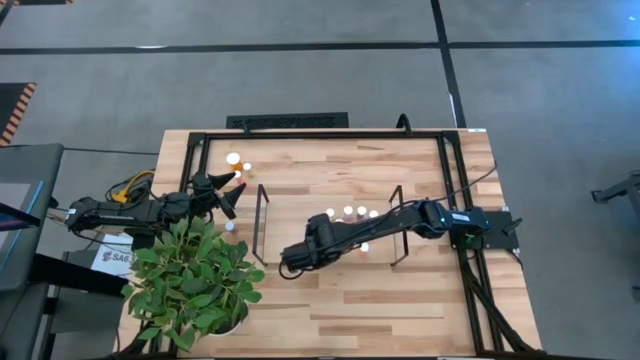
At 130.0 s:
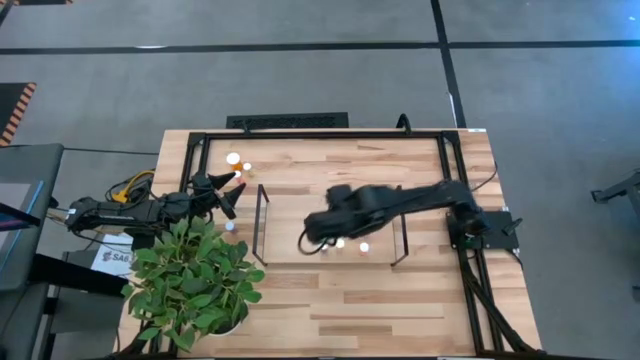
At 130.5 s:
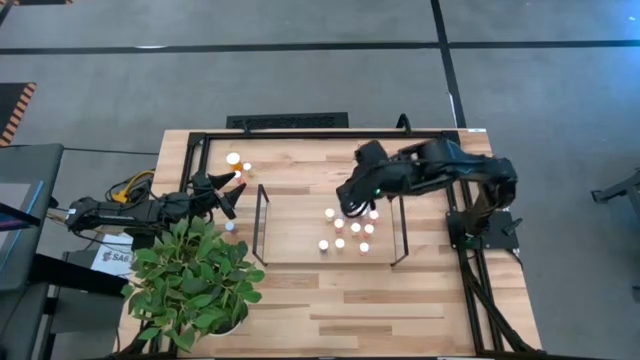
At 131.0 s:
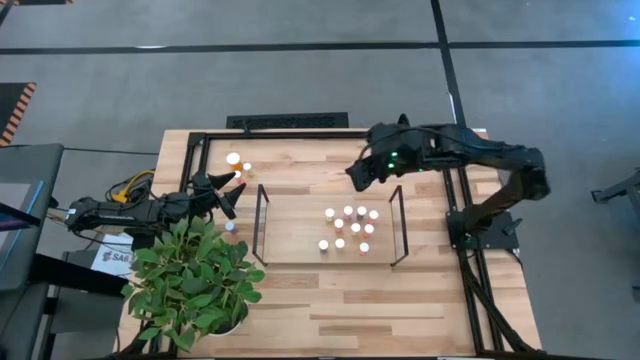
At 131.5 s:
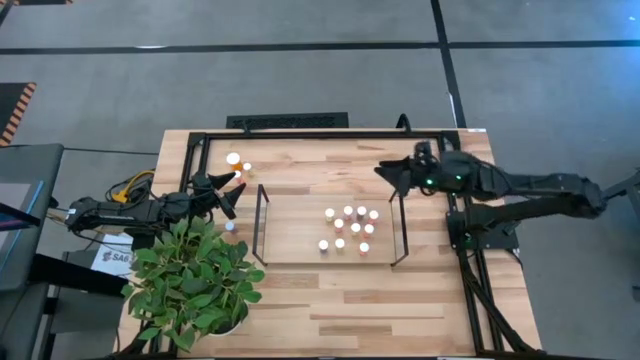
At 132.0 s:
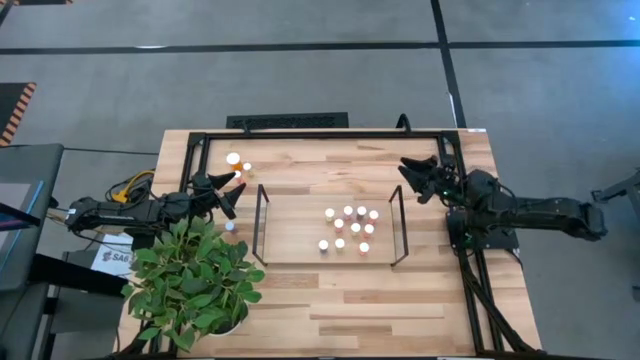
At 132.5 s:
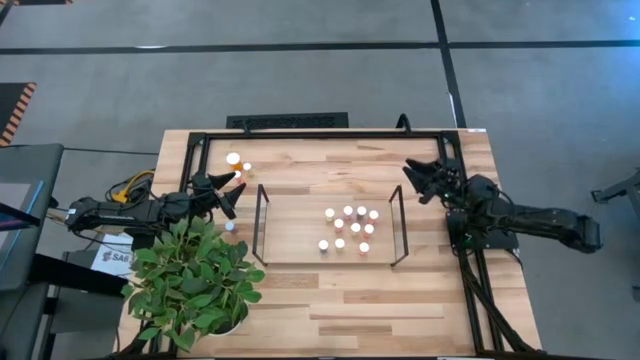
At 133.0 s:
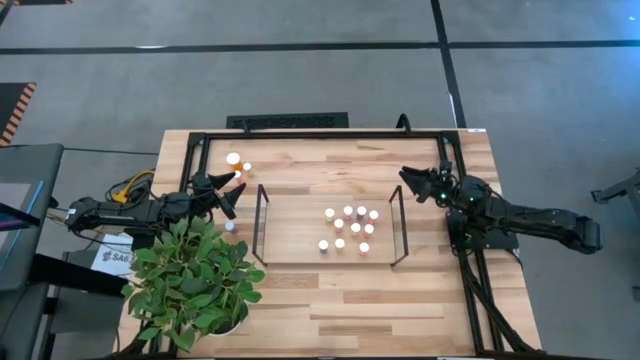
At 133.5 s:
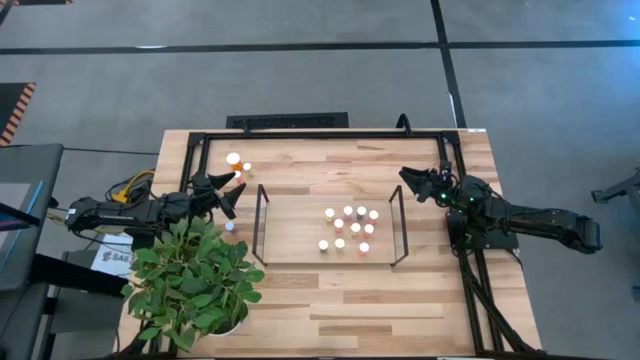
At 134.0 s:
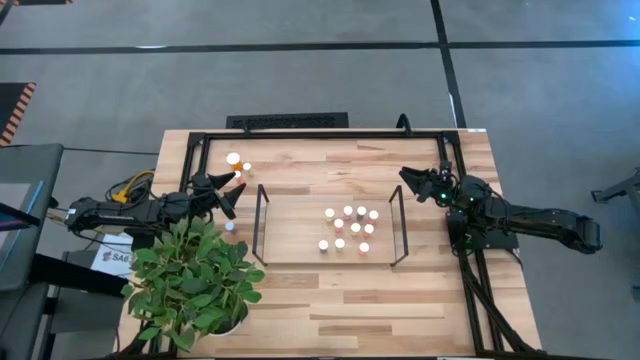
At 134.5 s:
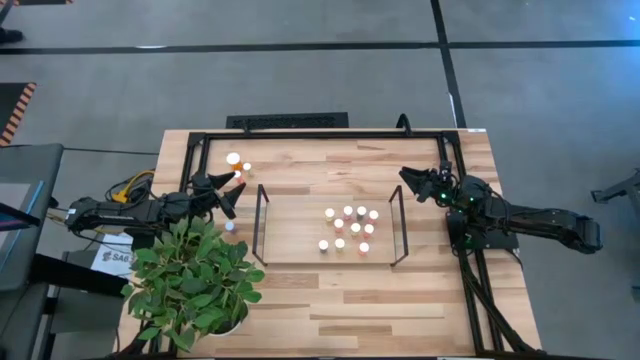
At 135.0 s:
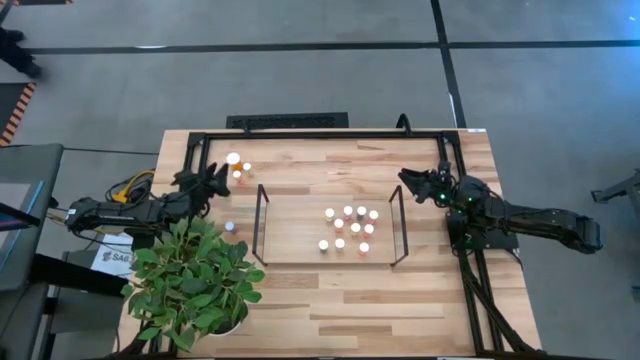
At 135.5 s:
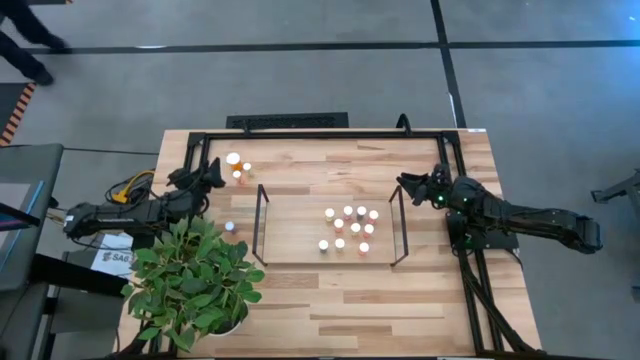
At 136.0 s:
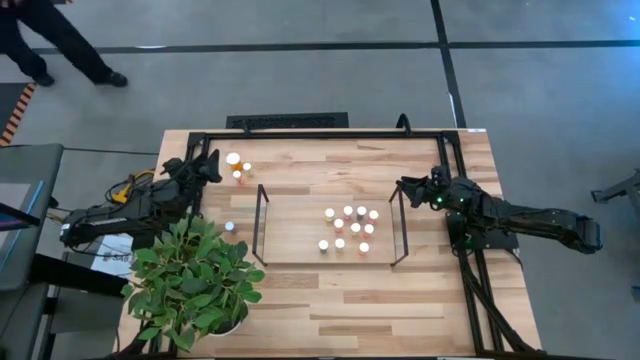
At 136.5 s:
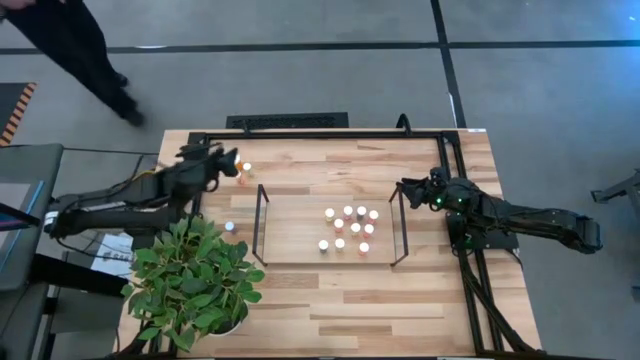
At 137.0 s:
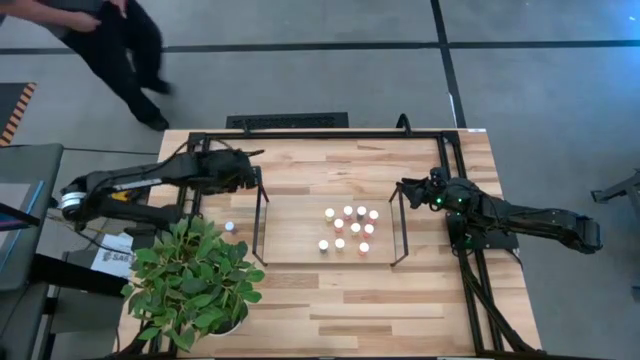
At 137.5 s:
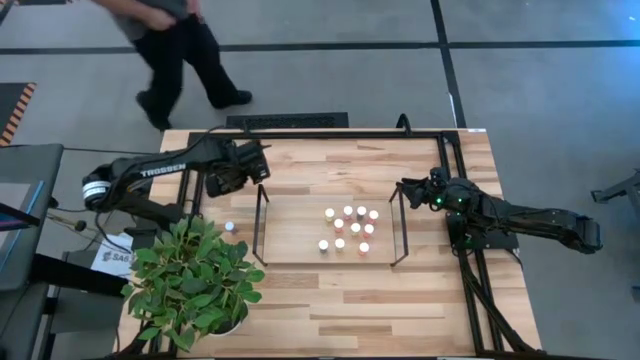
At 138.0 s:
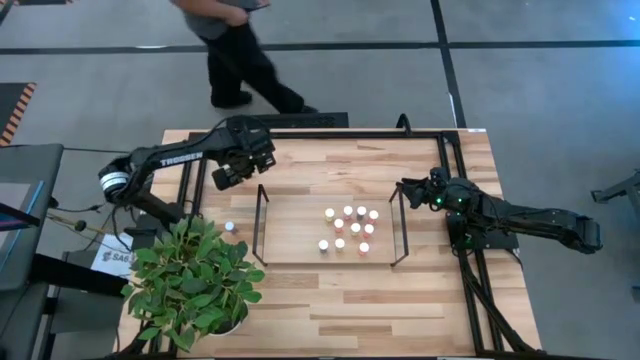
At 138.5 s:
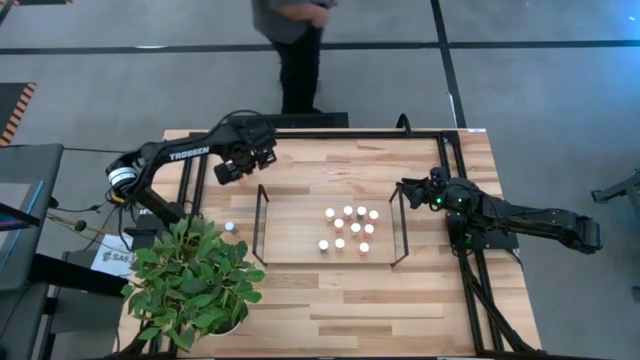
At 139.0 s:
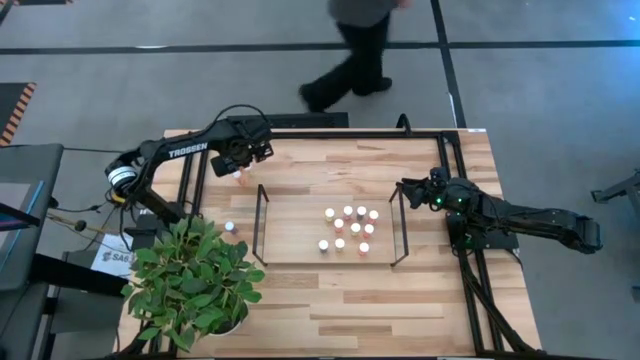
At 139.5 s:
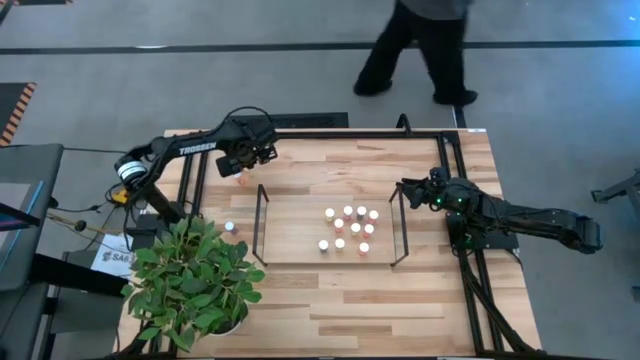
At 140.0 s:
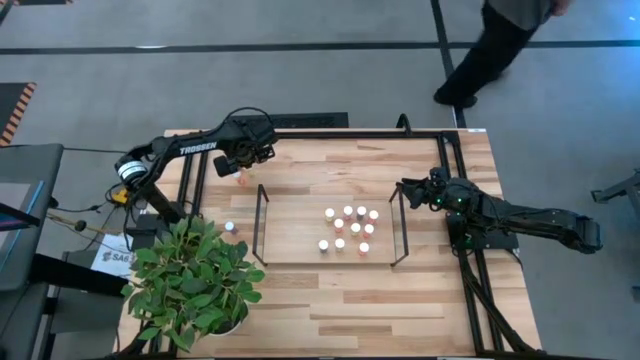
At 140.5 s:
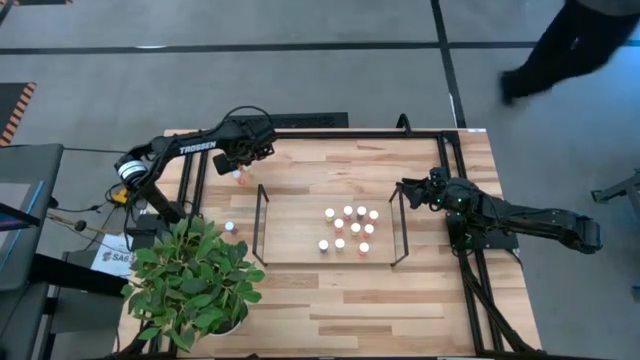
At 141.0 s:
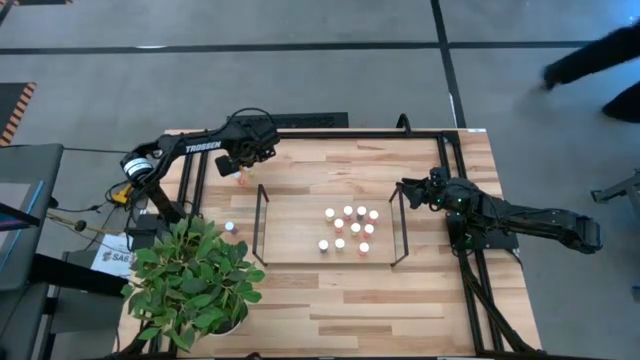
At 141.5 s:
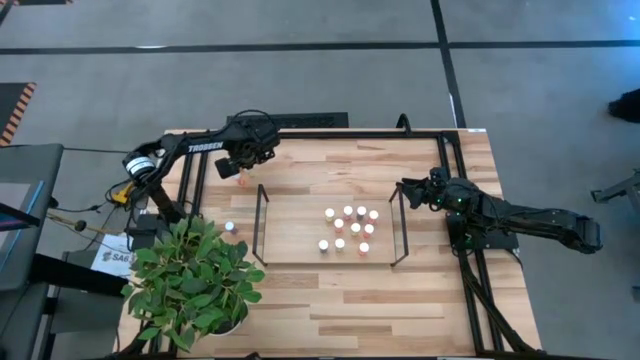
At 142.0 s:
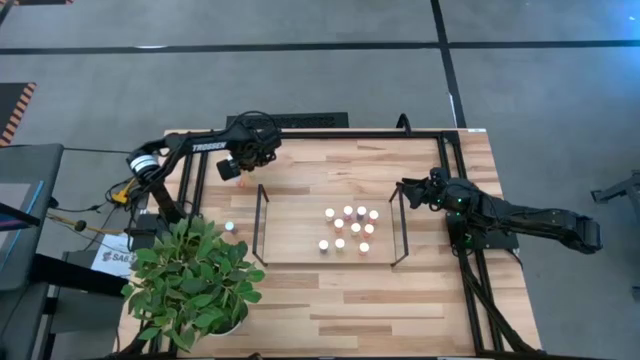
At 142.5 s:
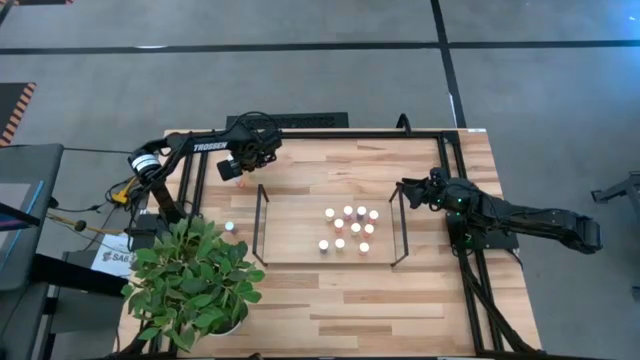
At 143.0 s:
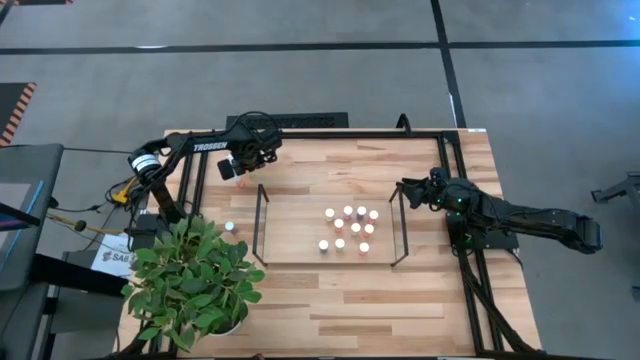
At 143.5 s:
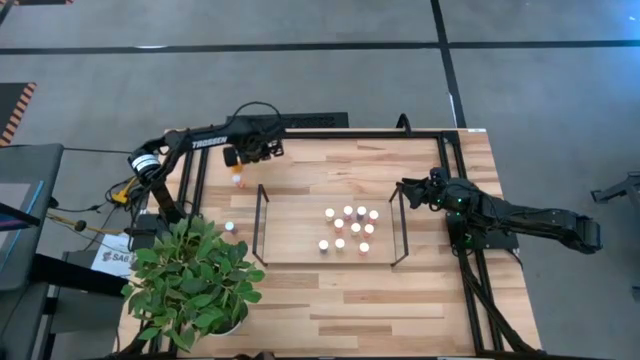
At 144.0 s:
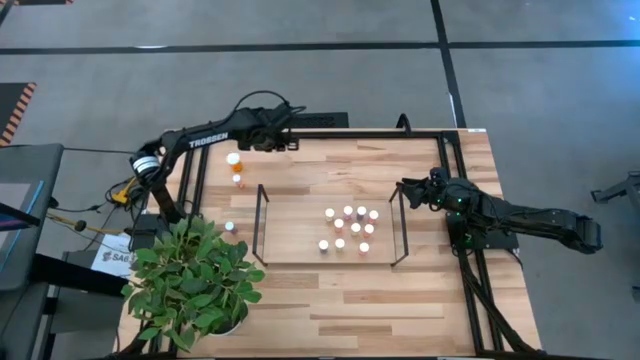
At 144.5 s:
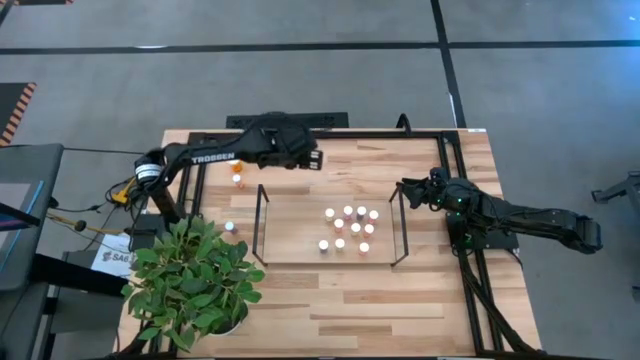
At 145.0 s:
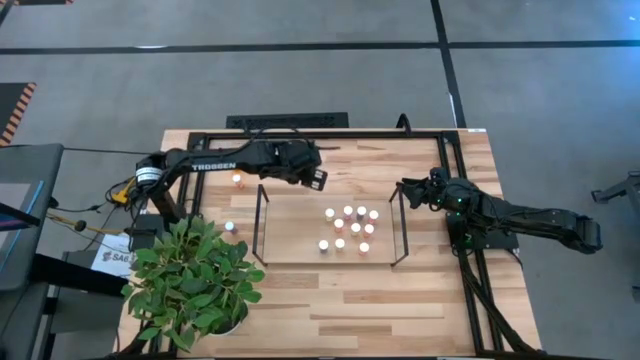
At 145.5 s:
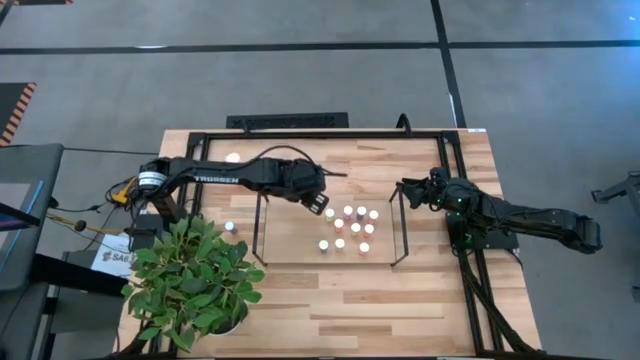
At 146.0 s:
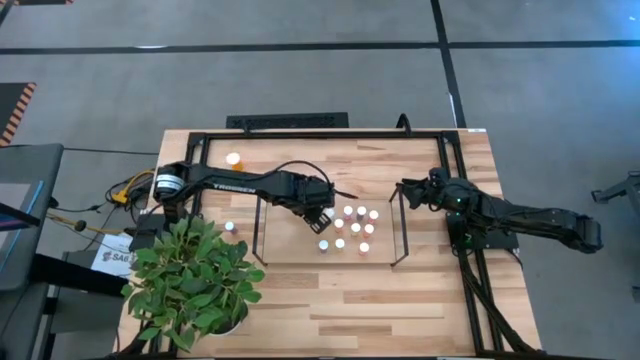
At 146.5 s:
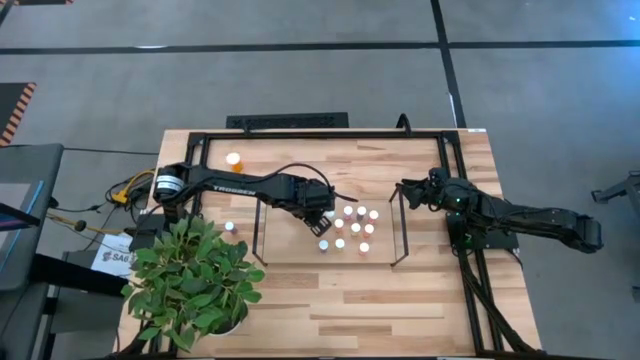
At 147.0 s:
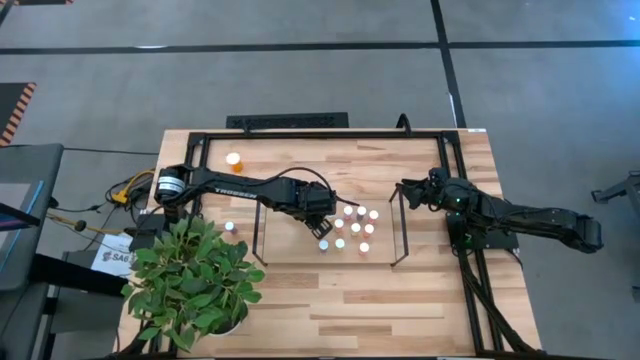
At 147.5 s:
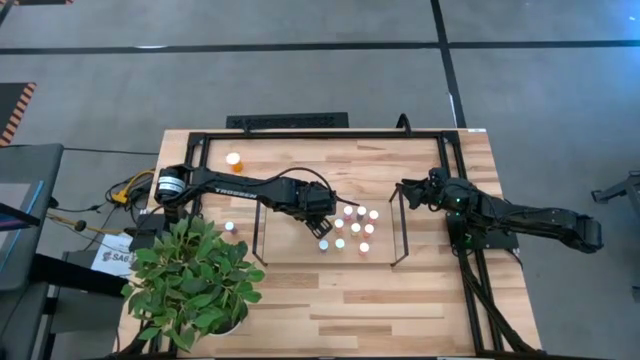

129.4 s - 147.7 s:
Task: Pick and place medicine bottles onto shelf by color
Put the yellow pill bottle on the shelf

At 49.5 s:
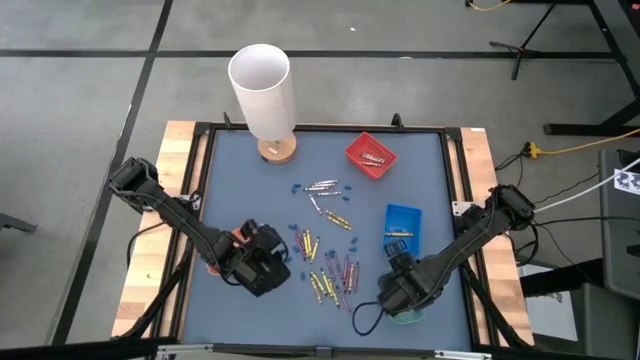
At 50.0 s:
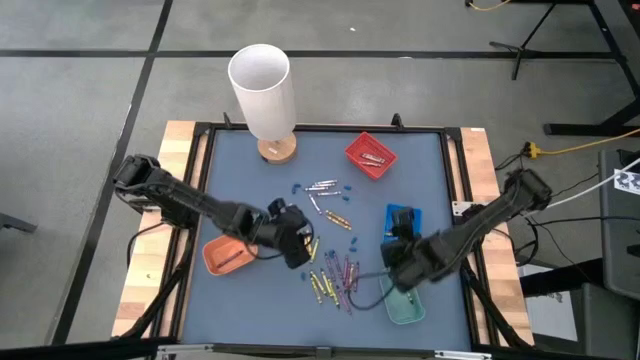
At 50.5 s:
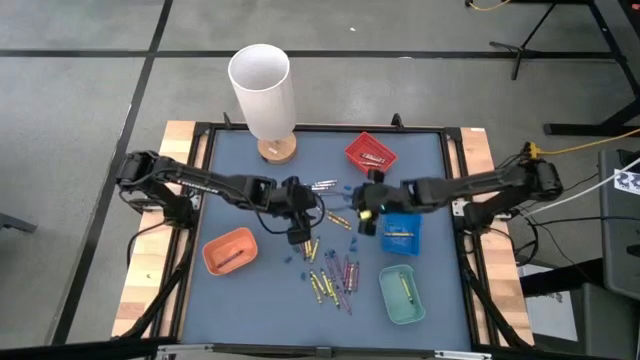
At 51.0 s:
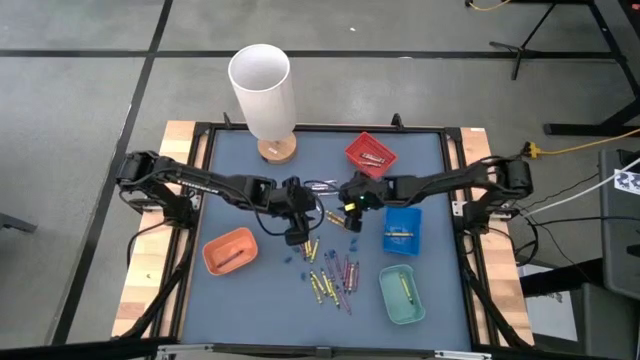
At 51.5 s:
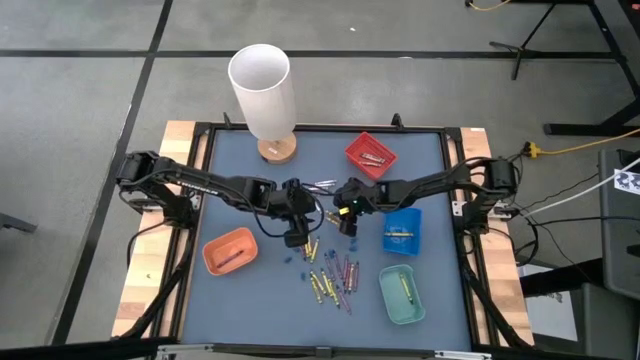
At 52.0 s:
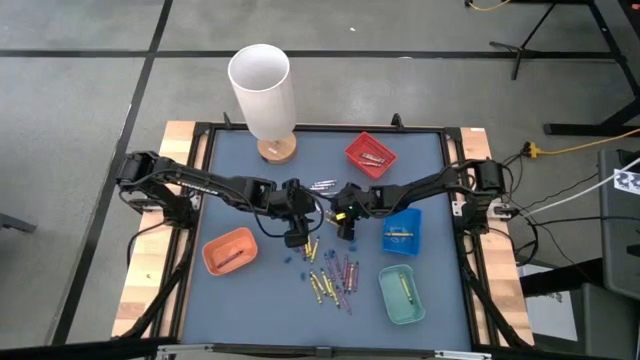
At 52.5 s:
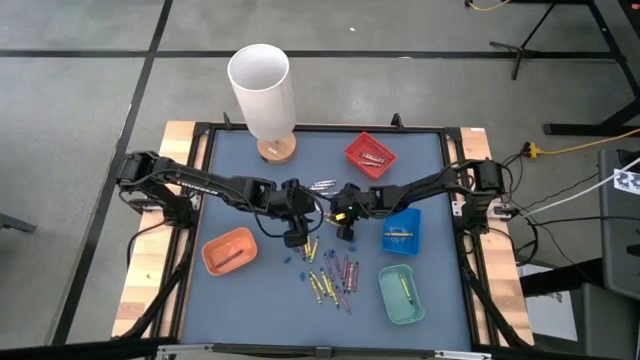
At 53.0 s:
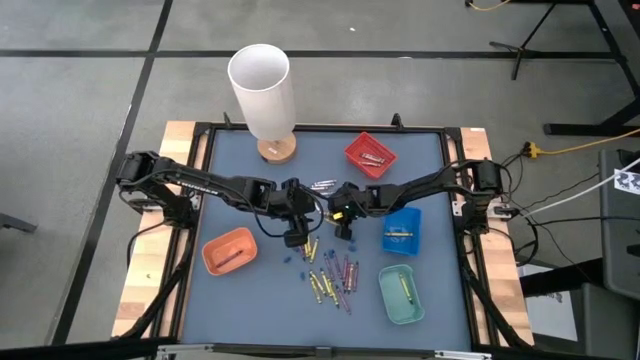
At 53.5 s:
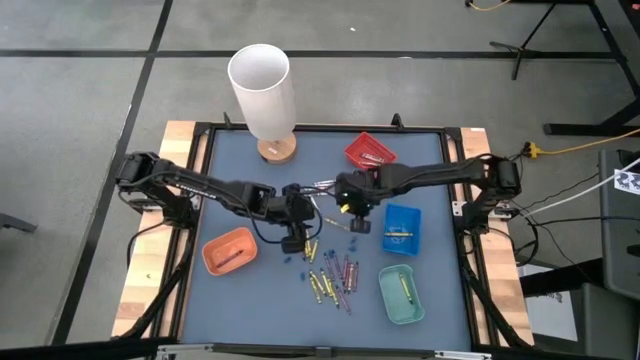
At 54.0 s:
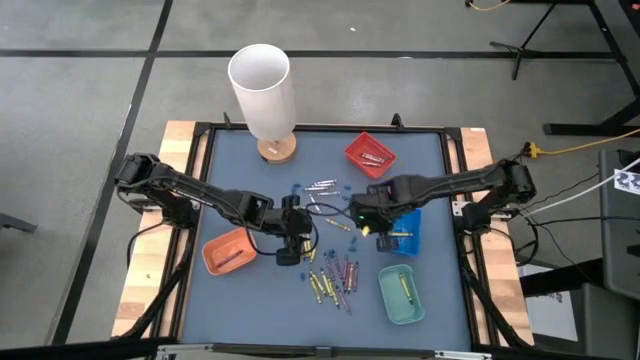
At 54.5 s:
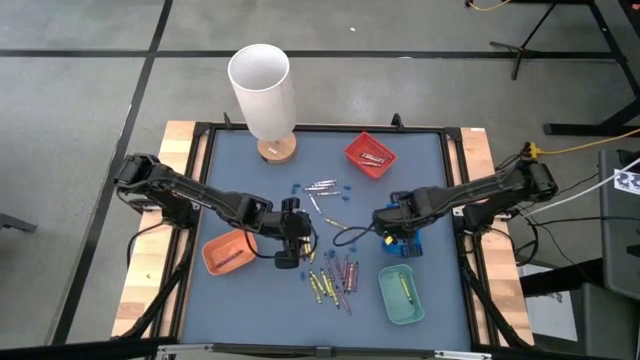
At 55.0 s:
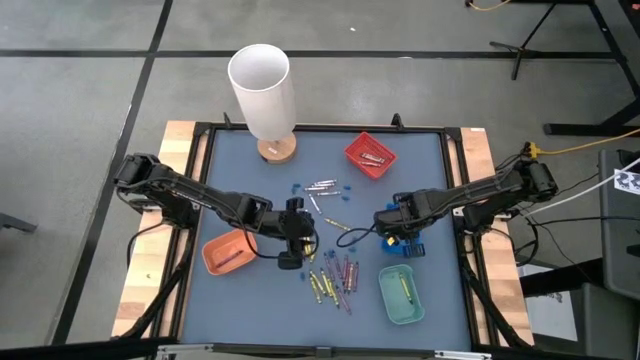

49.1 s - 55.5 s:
Task: Sort crayons
Put the yellow crayon into the blue bin
